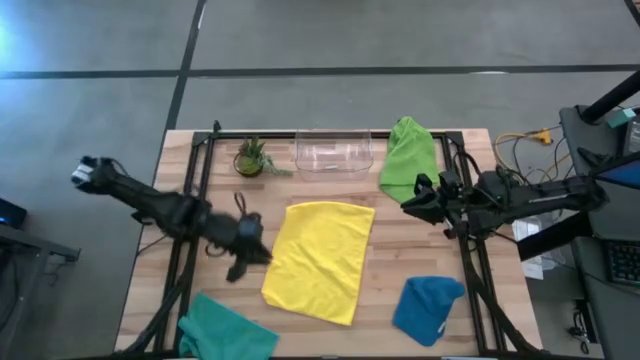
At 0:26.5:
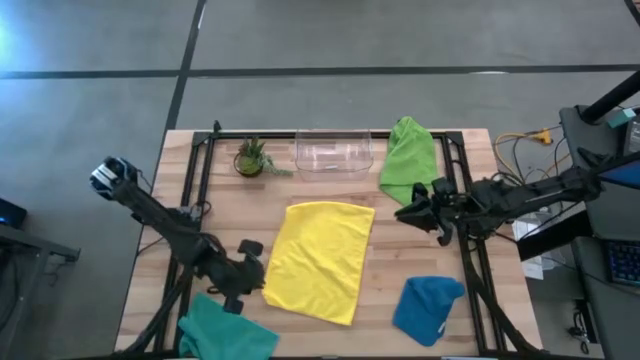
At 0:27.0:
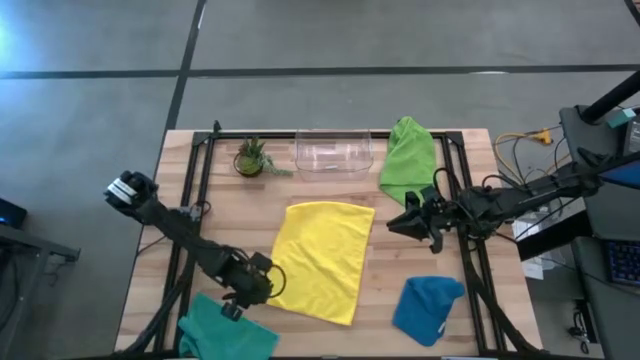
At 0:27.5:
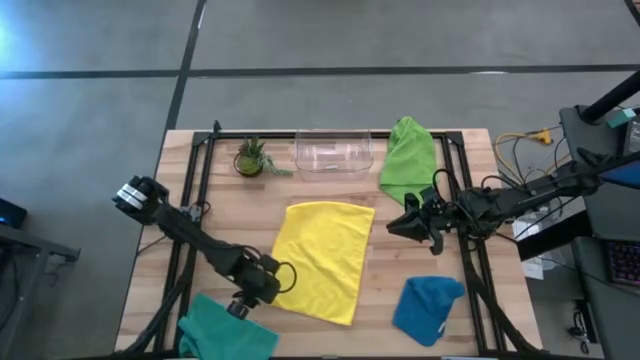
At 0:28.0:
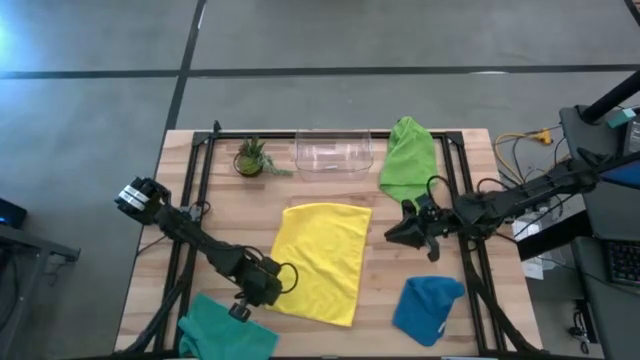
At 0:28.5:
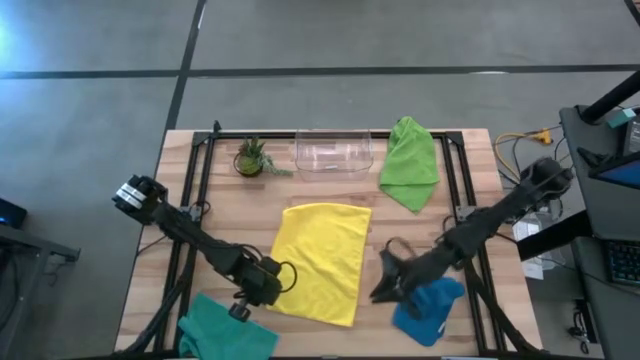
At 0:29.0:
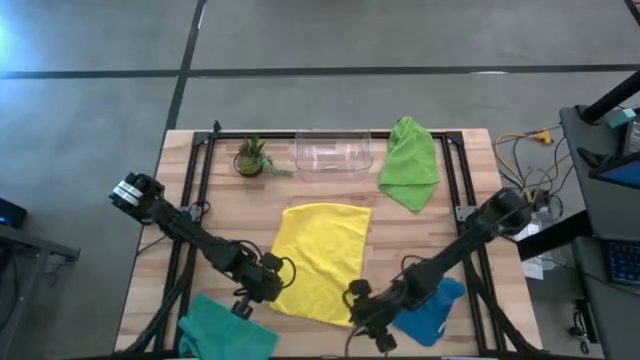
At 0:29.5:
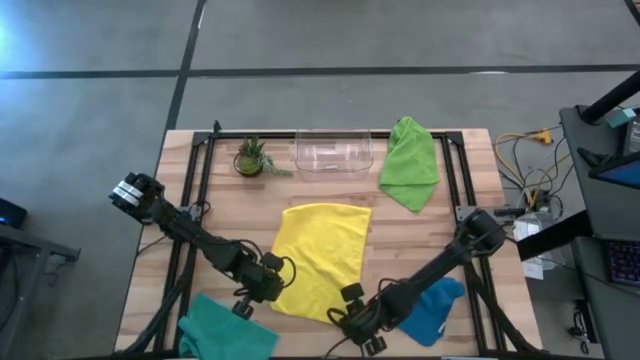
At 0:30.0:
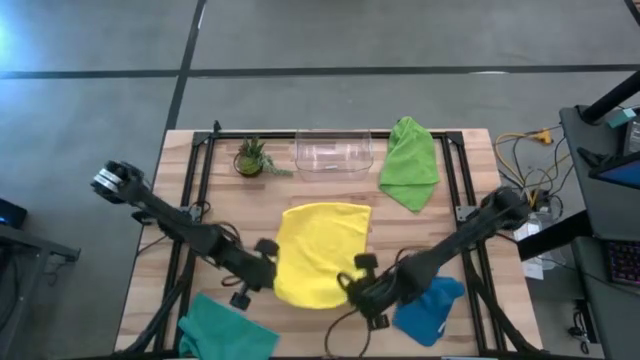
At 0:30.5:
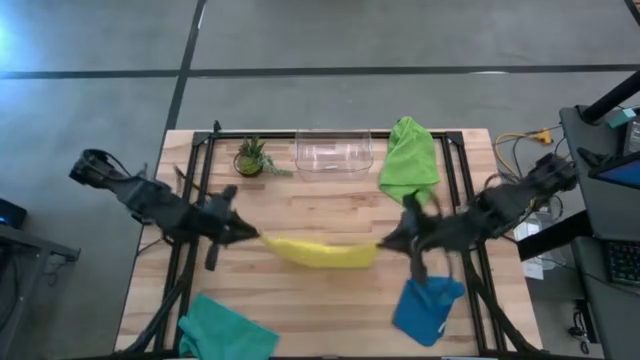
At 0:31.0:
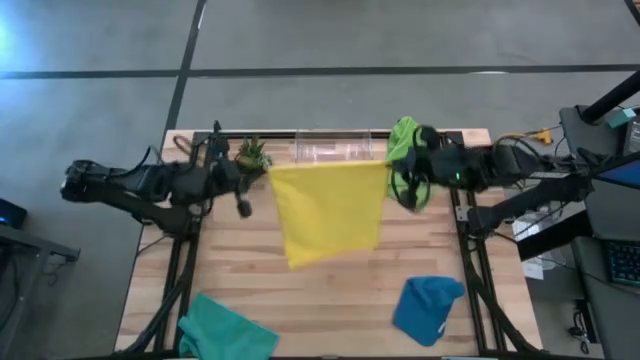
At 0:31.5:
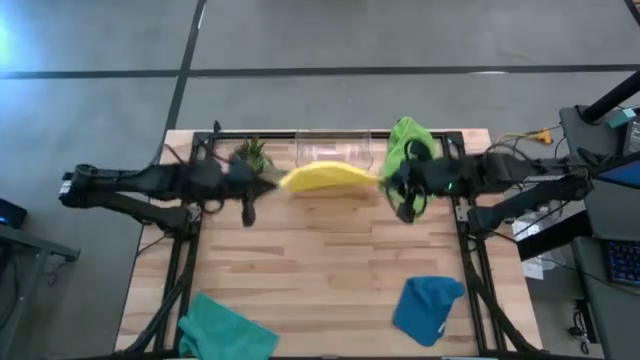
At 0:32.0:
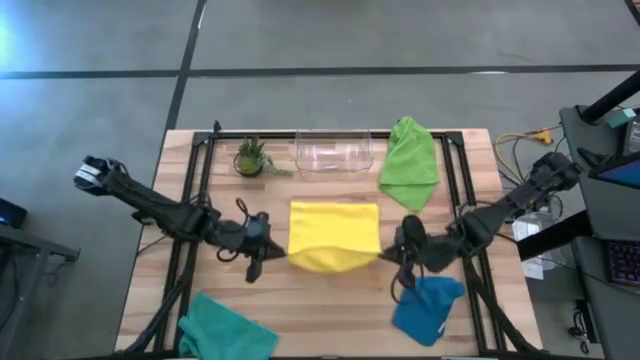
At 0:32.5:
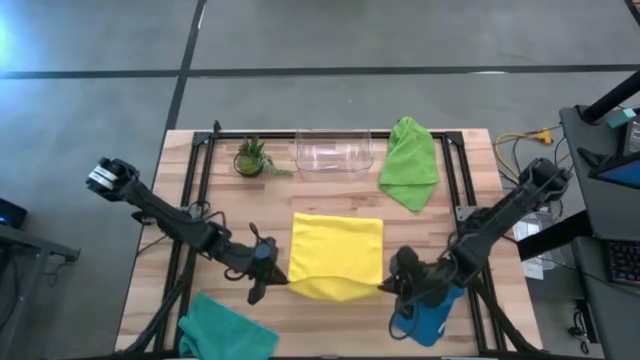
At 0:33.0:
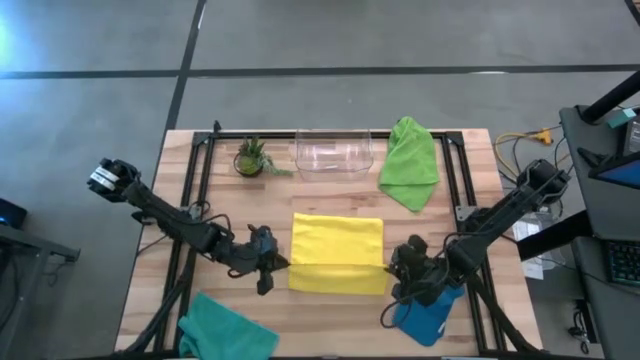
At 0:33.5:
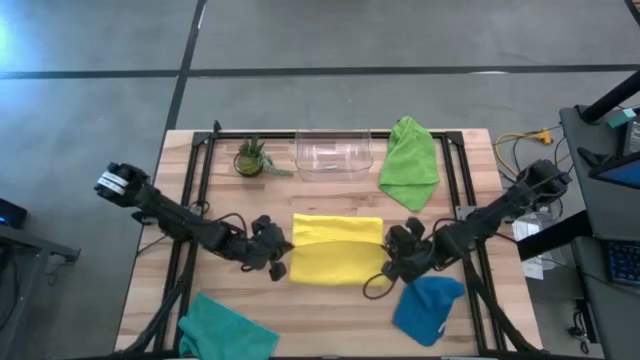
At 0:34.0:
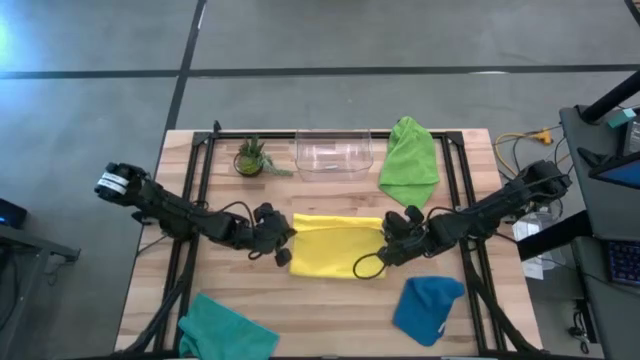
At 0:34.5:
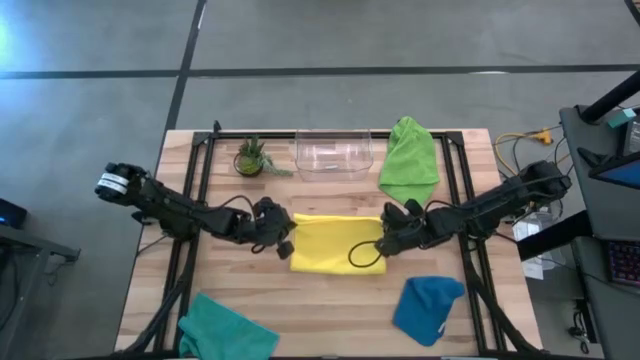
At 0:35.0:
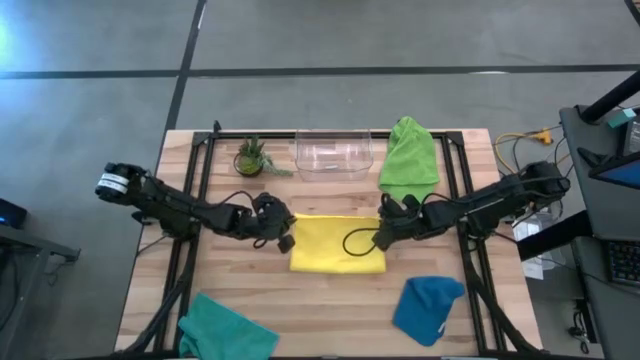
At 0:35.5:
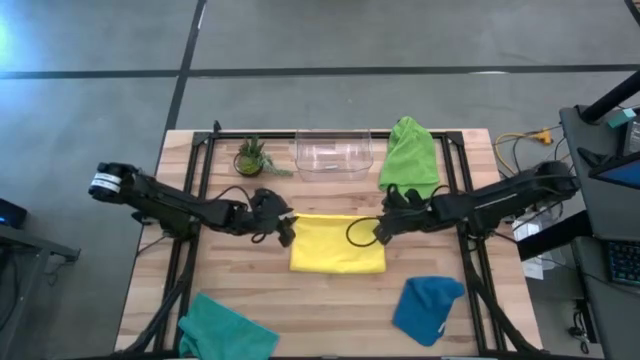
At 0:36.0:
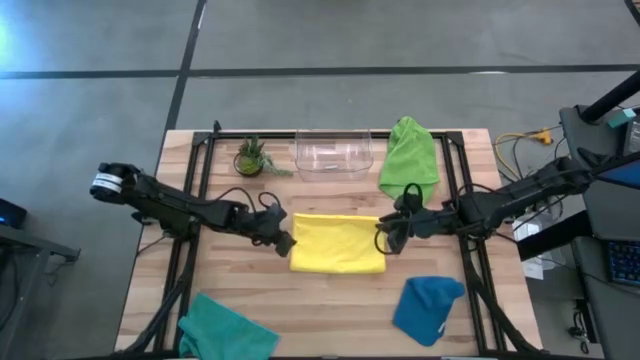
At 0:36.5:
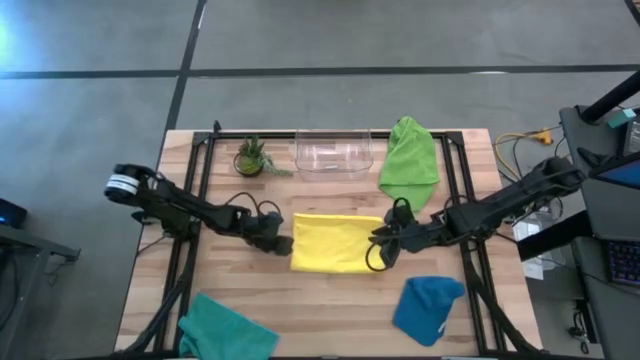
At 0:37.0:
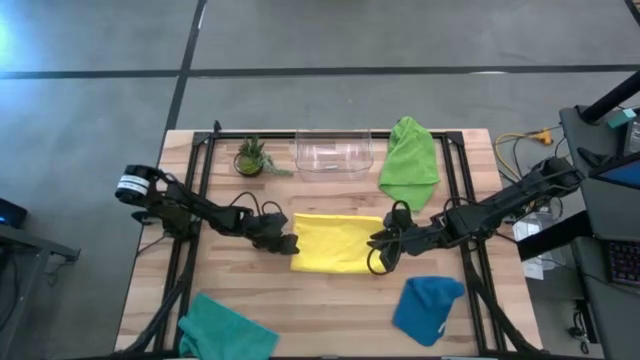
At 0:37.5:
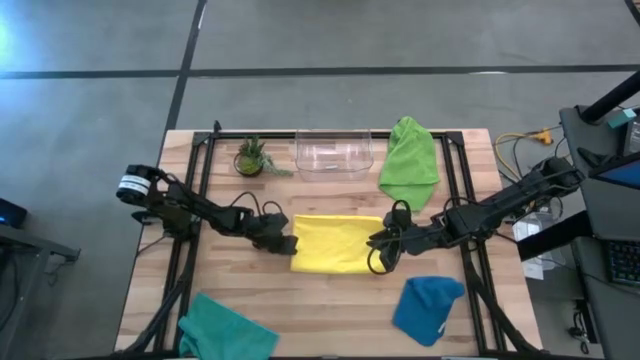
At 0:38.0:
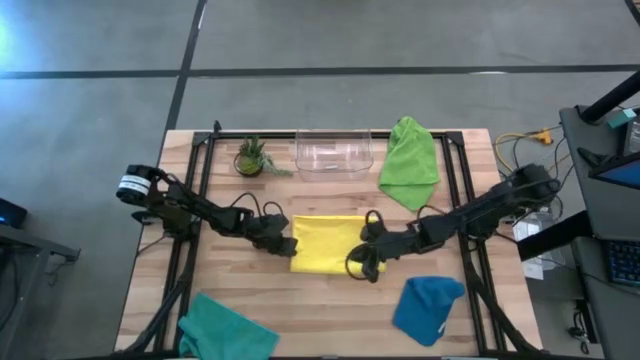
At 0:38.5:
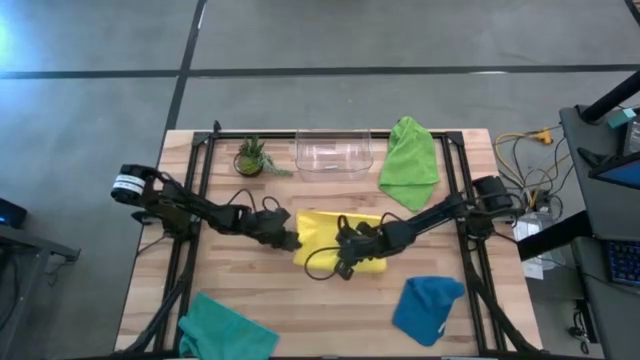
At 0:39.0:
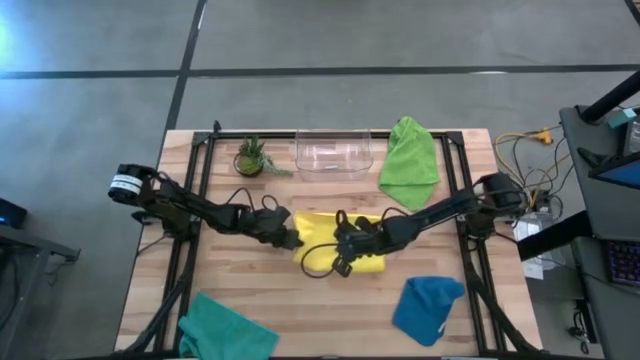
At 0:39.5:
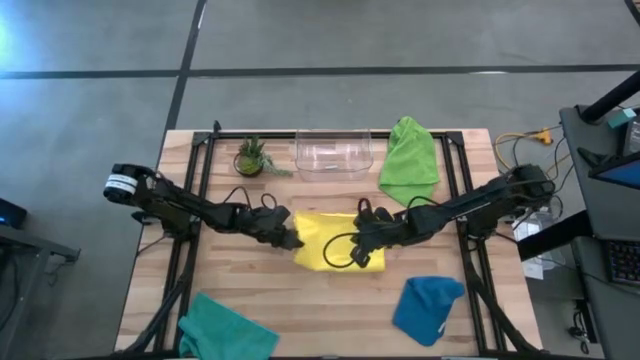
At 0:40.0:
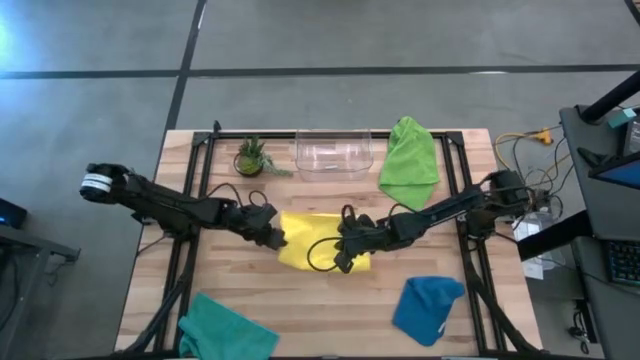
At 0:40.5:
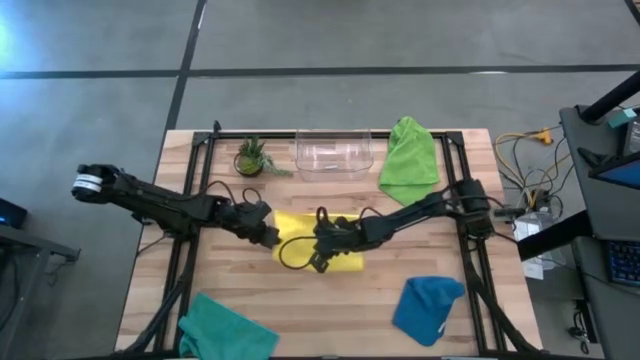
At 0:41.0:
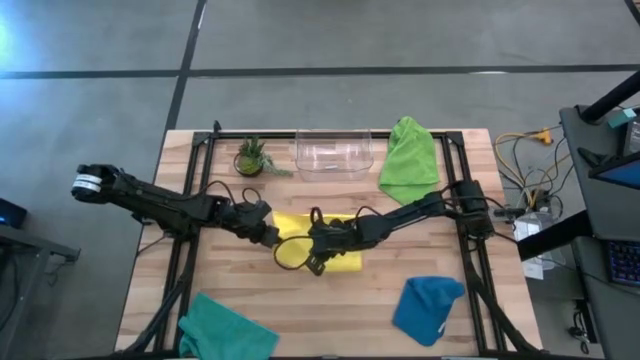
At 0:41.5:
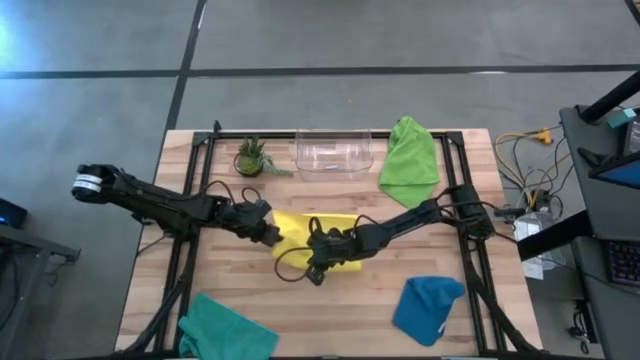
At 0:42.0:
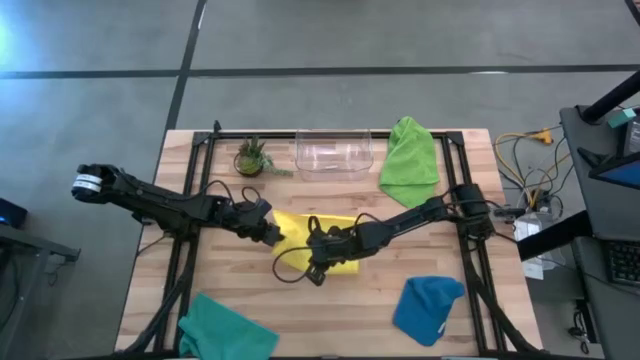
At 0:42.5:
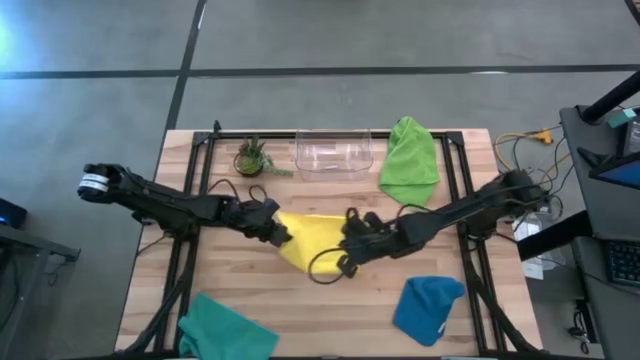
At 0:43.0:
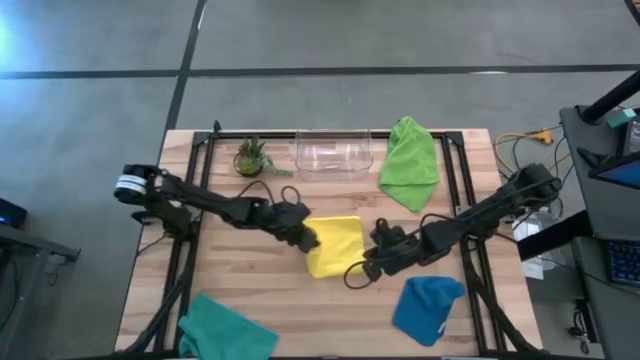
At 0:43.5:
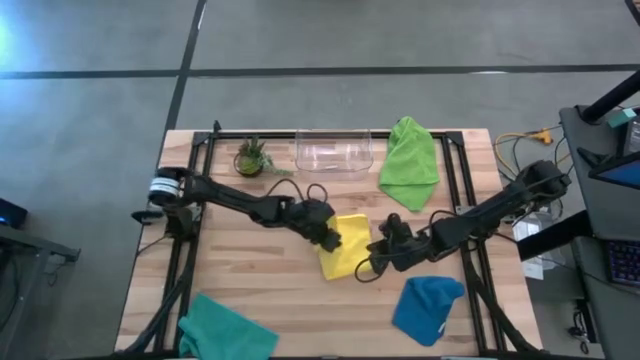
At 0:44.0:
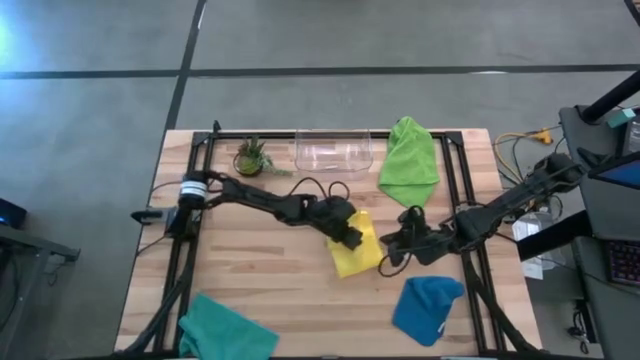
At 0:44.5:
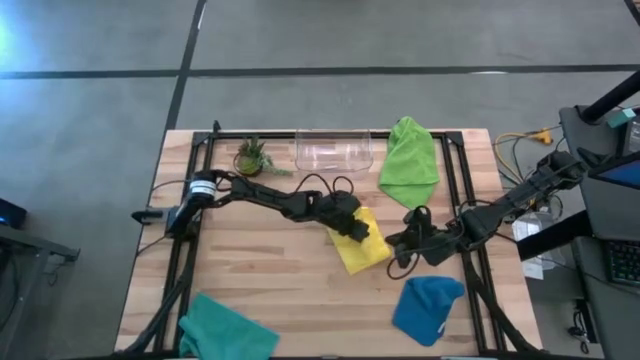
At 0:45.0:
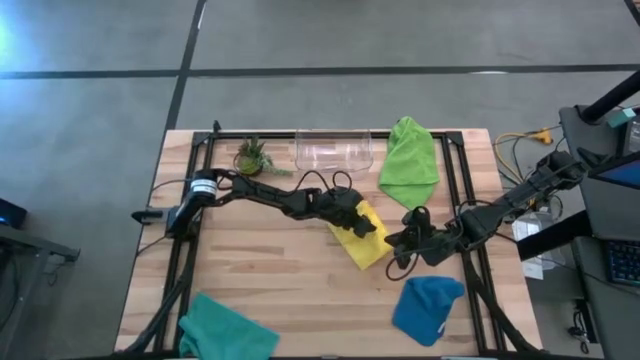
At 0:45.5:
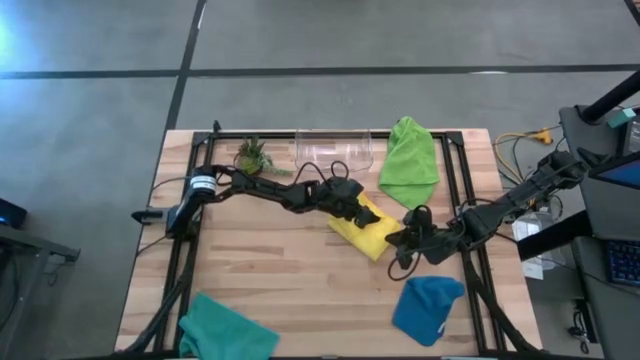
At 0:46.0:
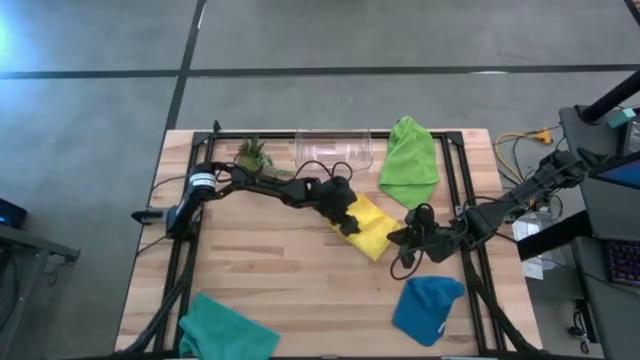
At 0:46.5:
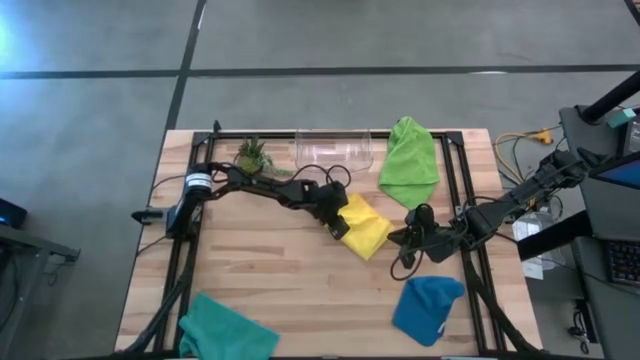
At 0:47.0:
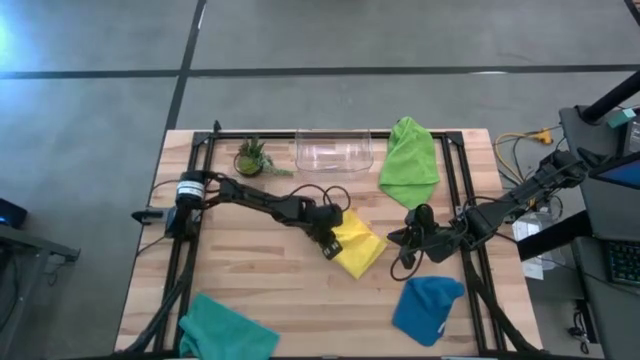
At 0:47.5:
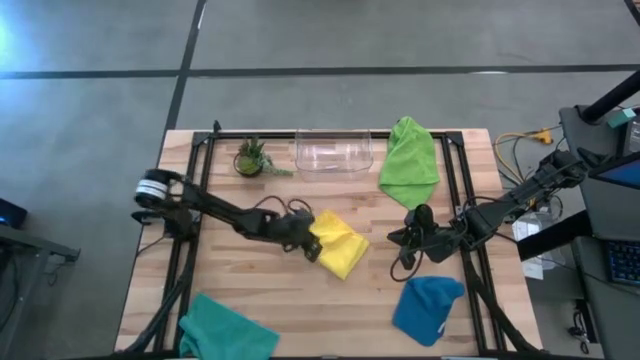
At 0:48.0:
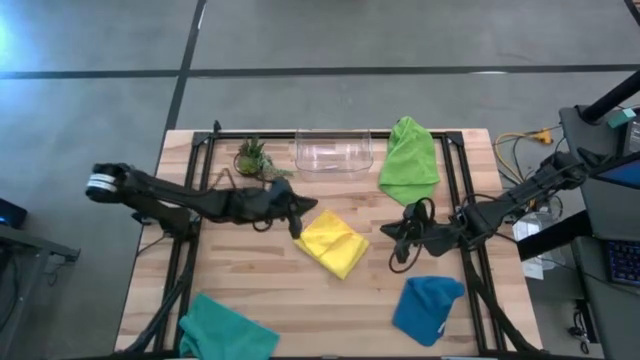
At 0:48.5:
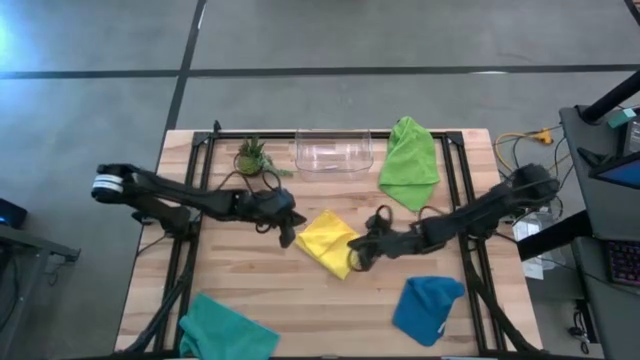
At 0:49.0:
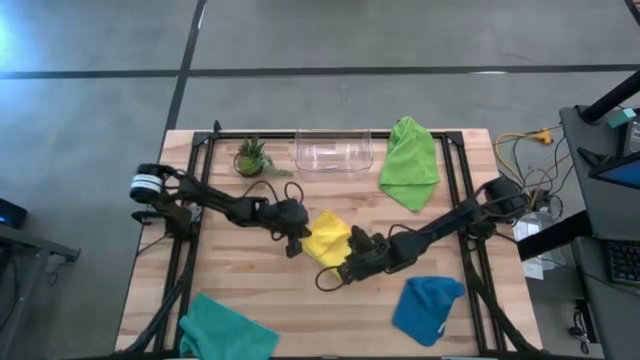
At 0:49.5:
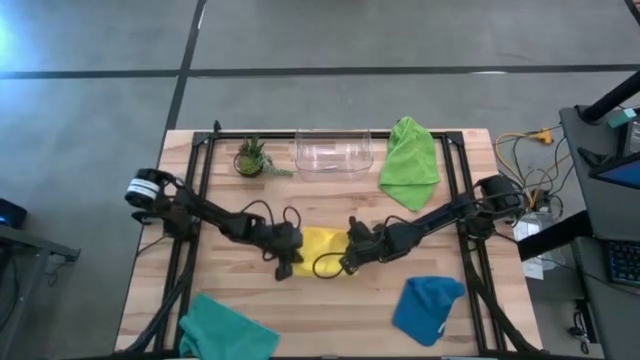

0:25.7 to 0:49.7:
Task: Fold microfiber towels
Fold the yellow microfiber towel
